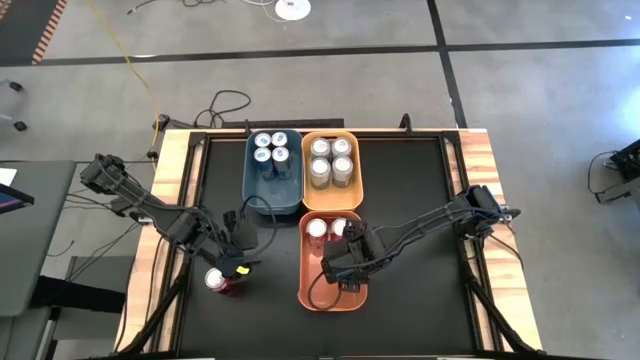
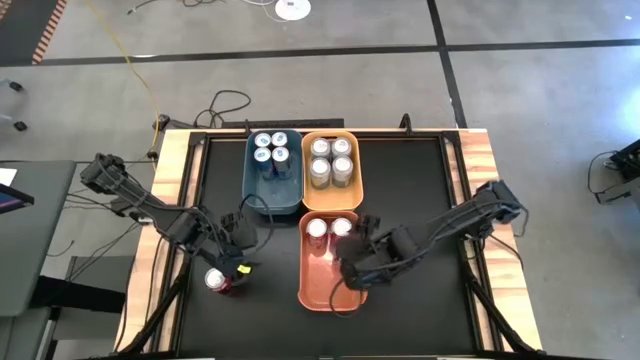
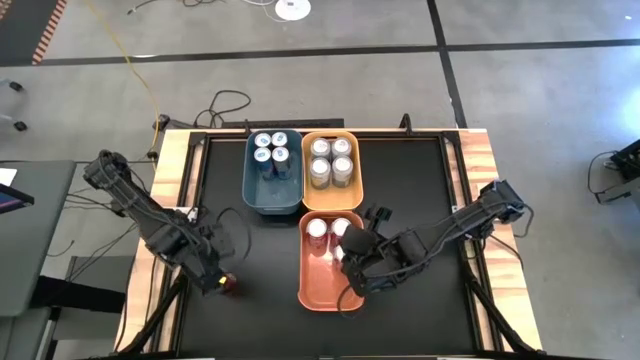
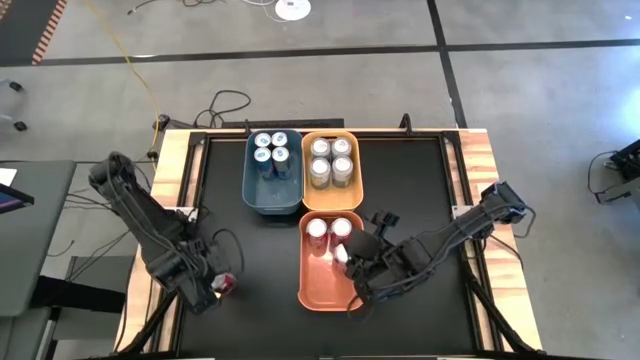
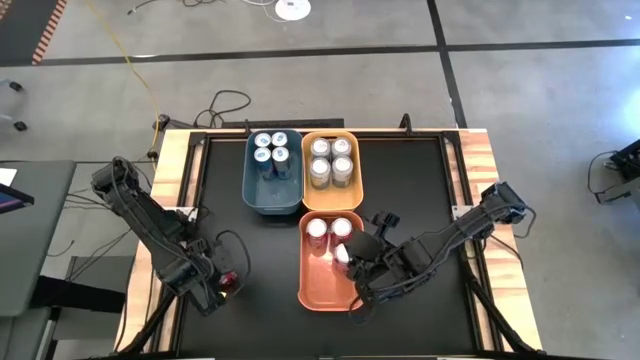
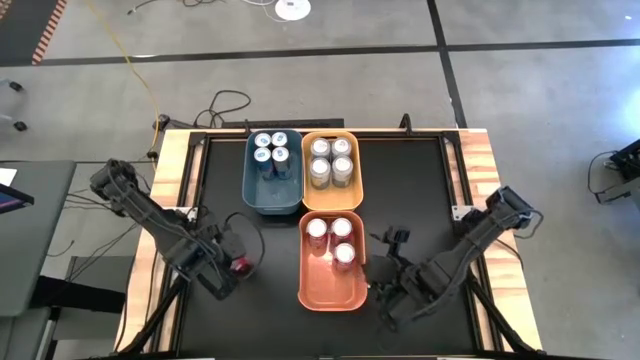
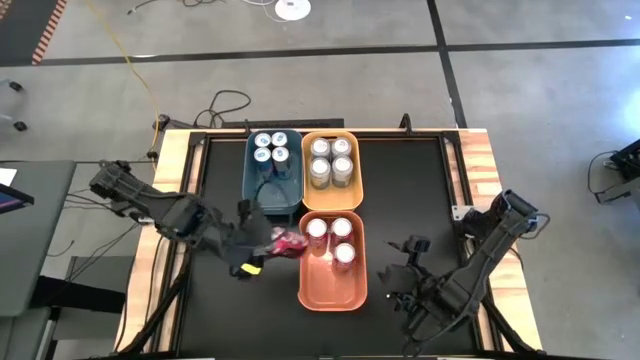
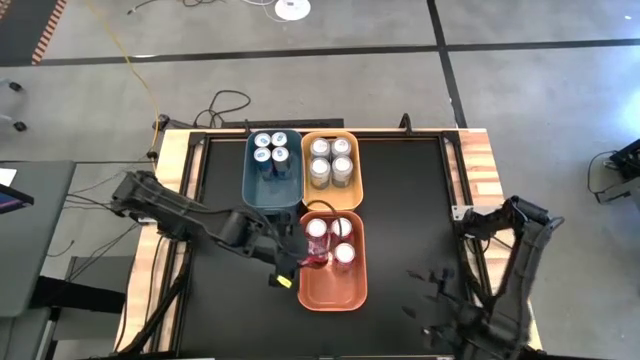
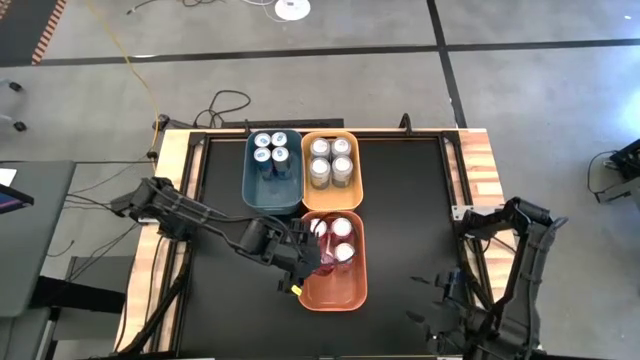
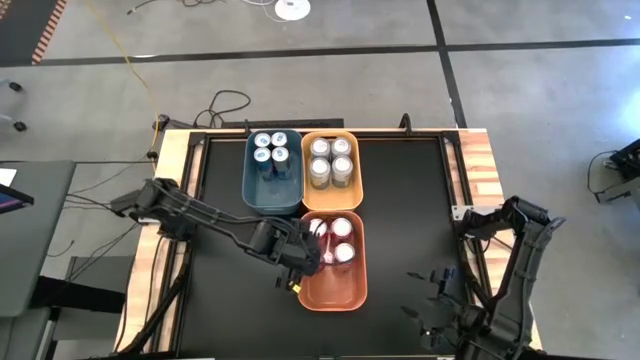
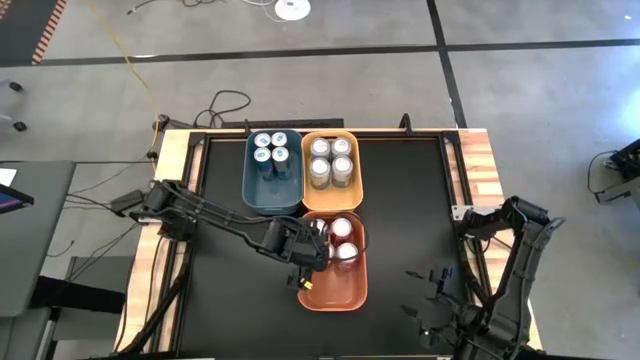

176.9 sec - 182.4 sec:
Task: Sort soda cans
Put the red soda can into the orange bin

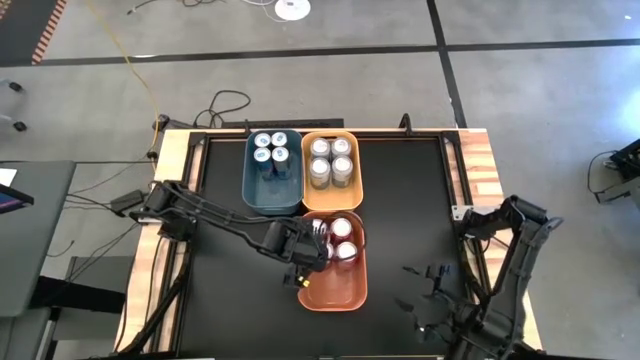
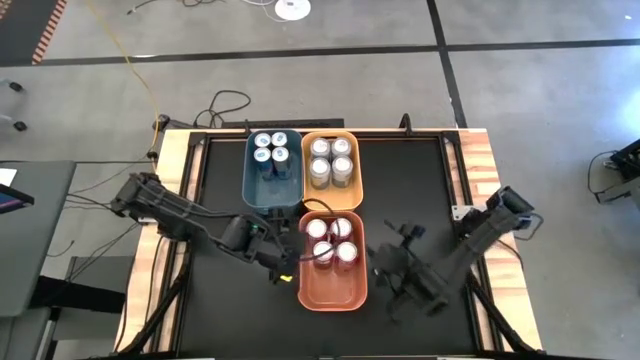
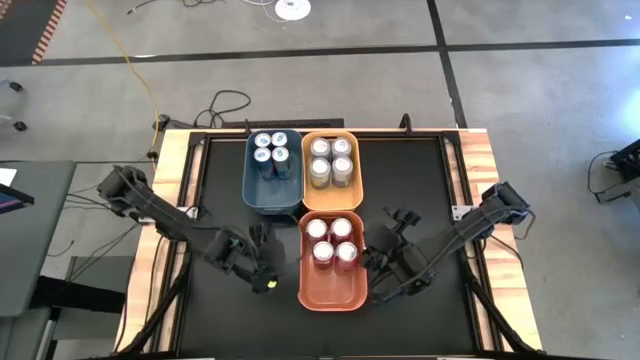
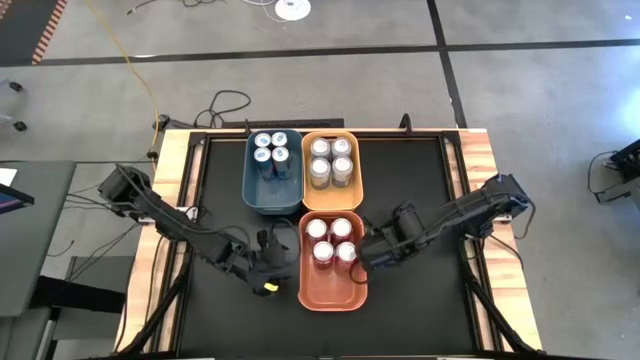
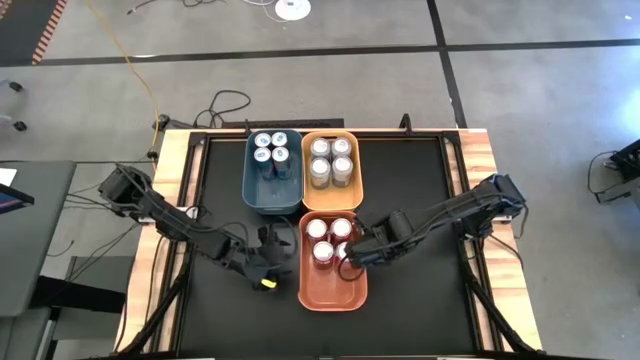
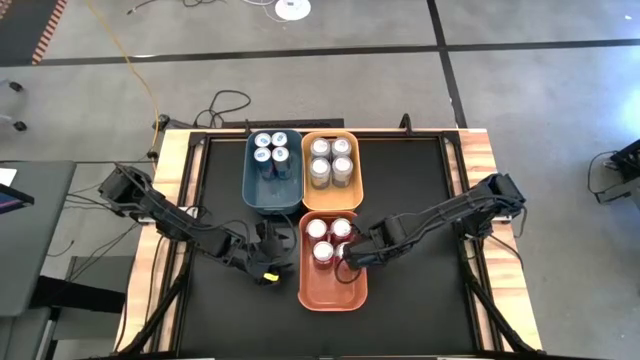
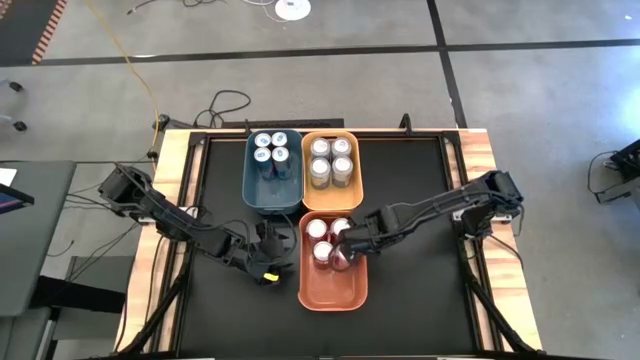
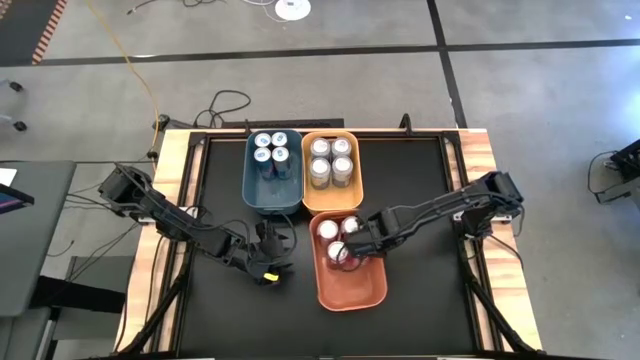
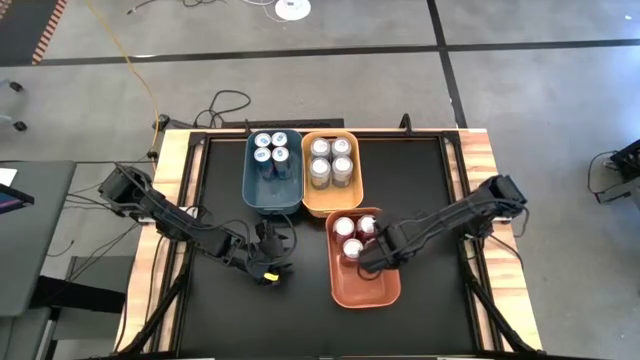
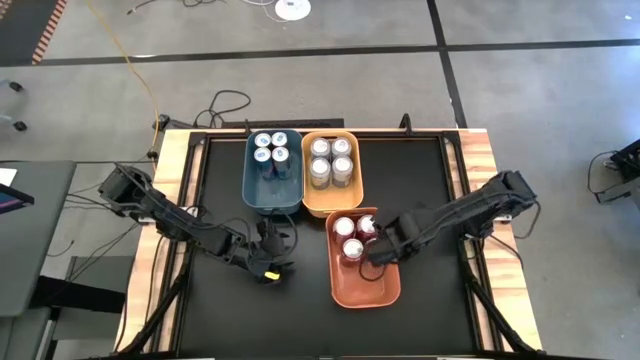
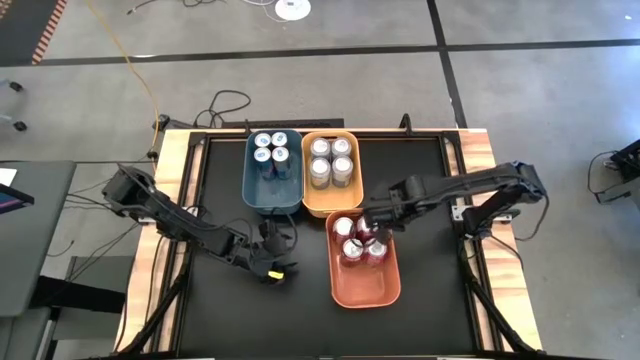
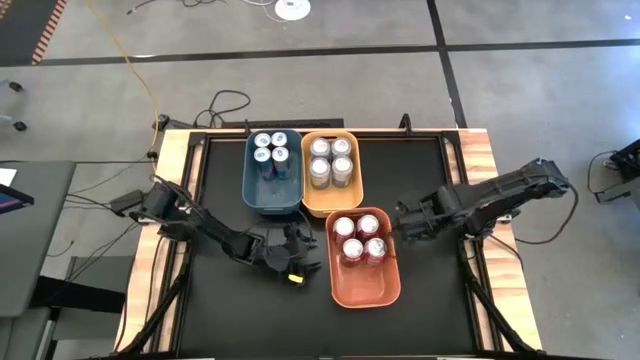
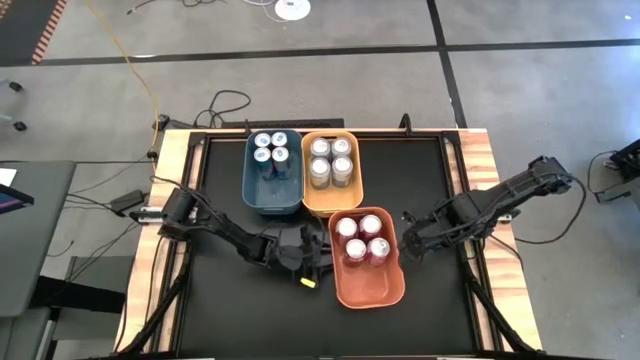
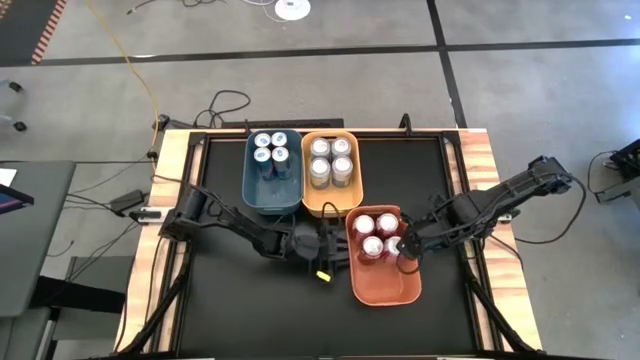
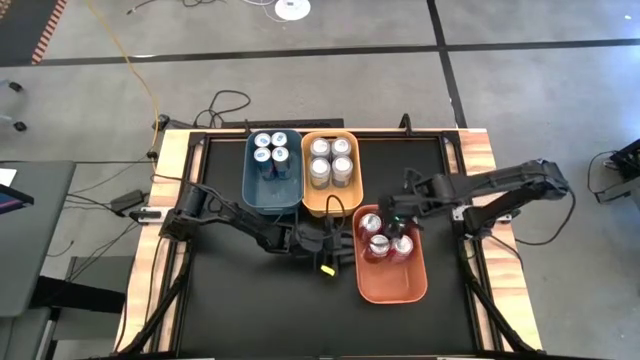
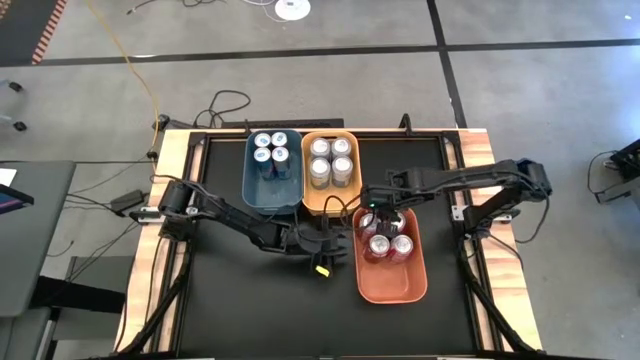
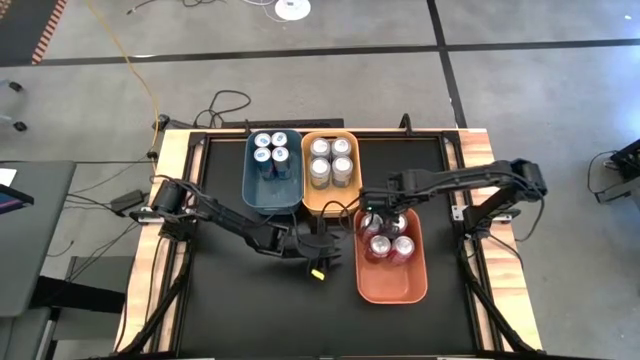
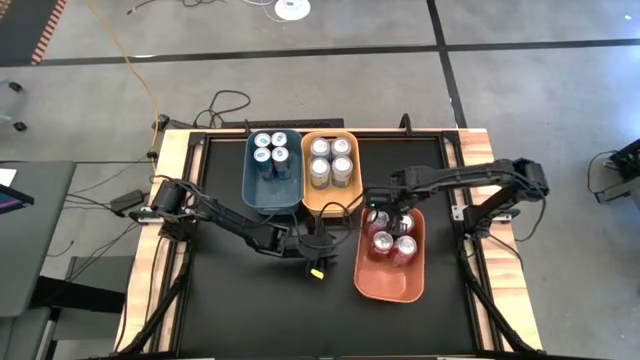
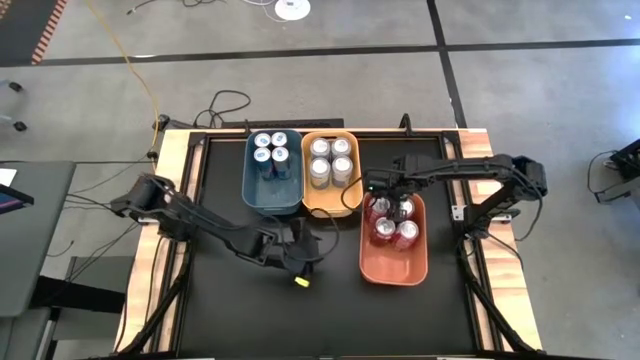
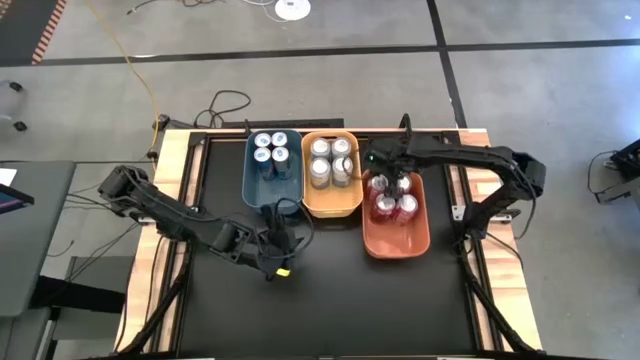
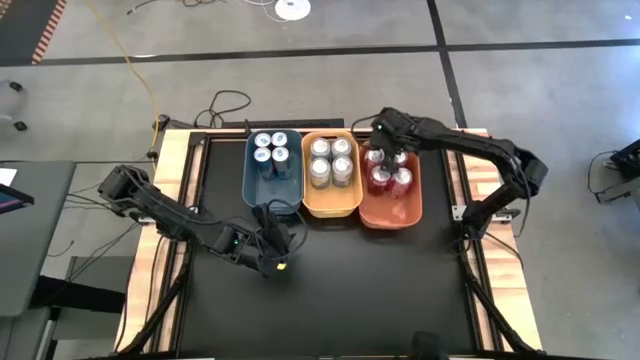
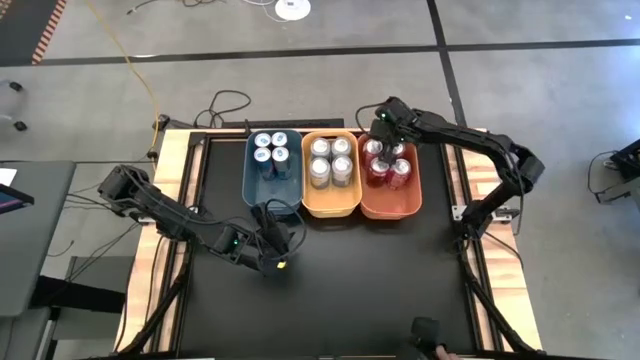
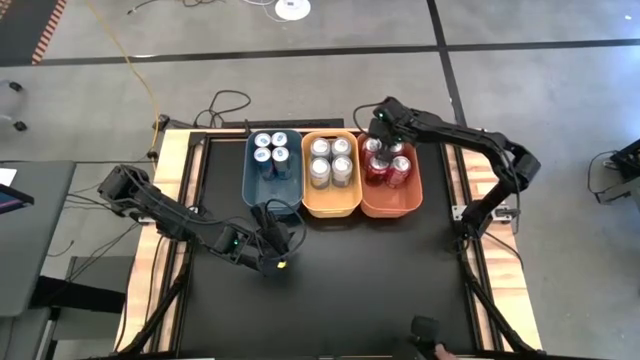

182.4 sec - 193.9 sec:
Move the orange bin to the right of the yellow bin

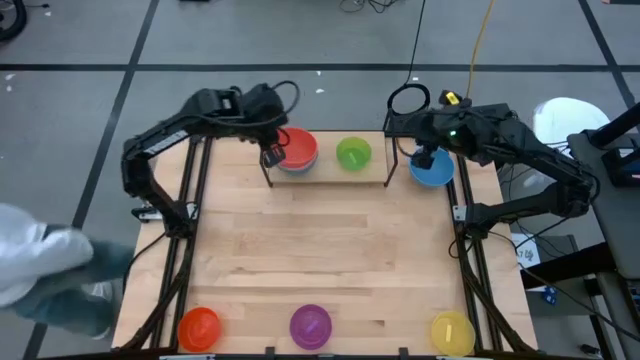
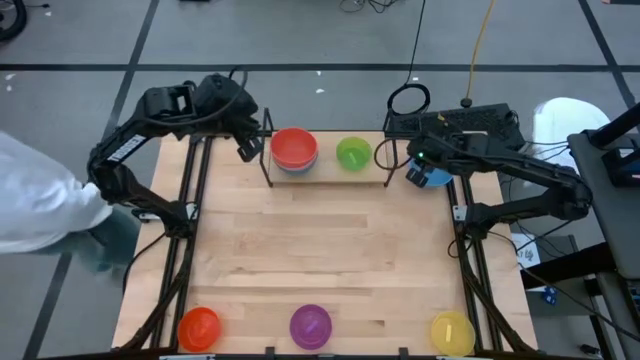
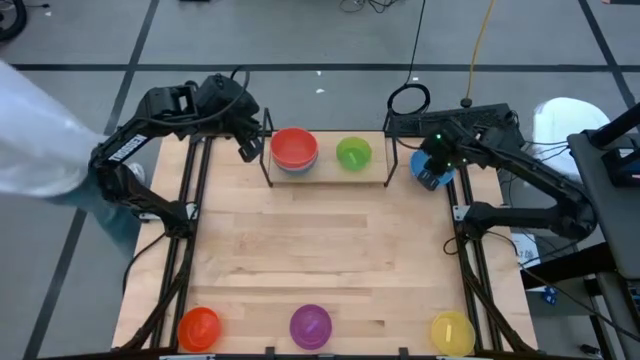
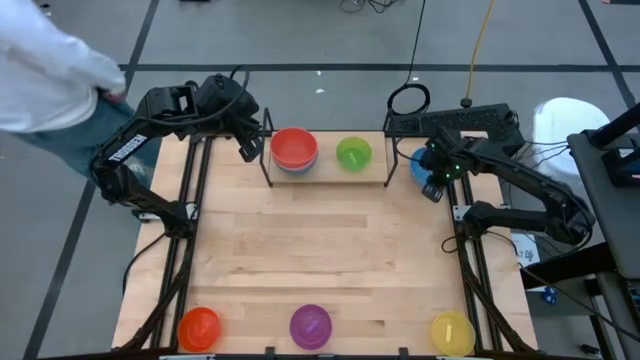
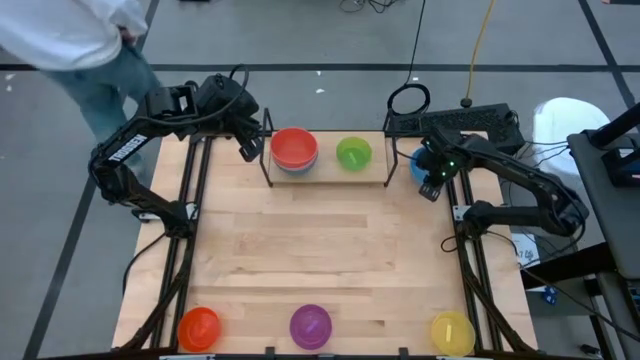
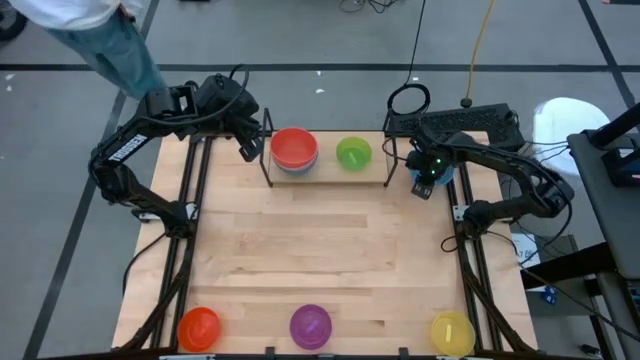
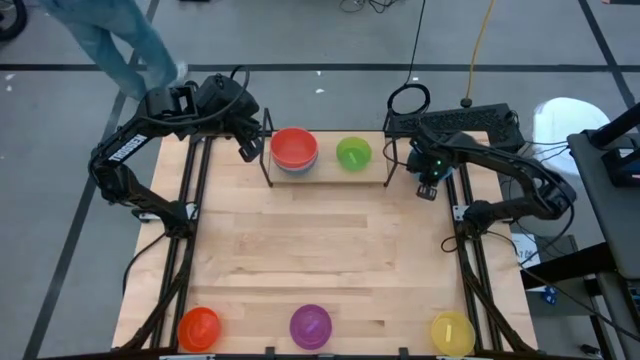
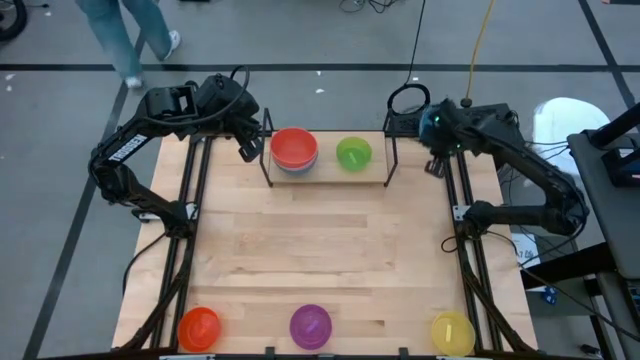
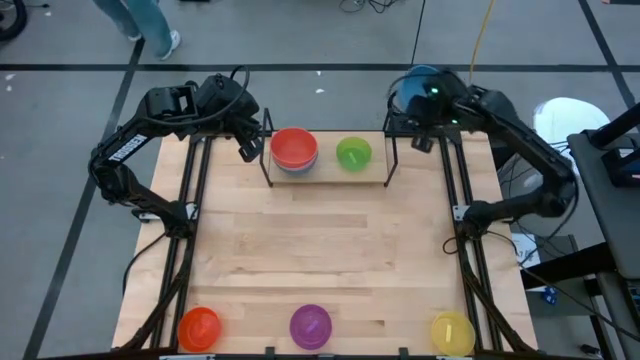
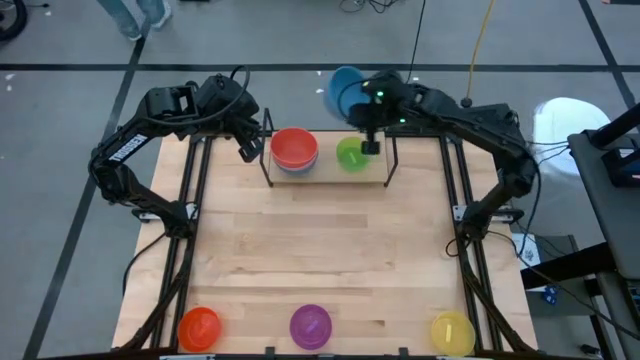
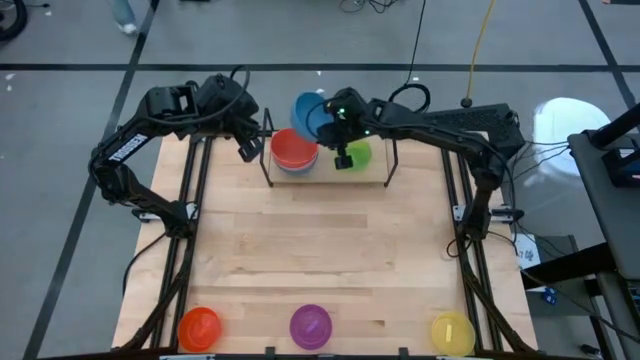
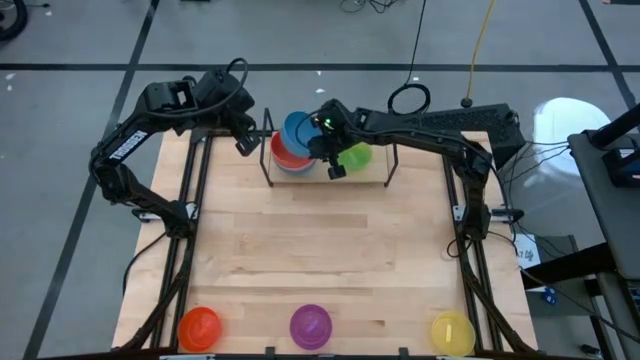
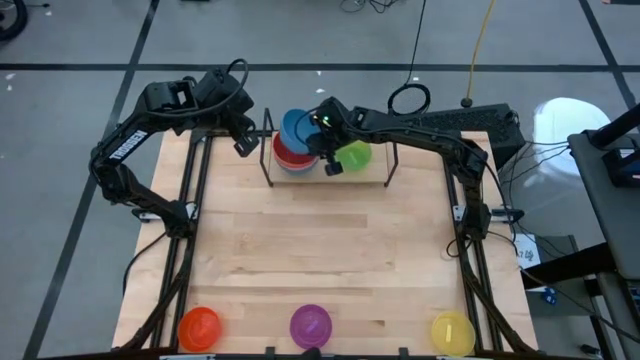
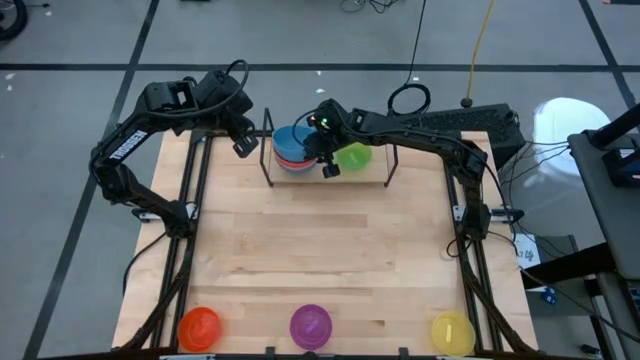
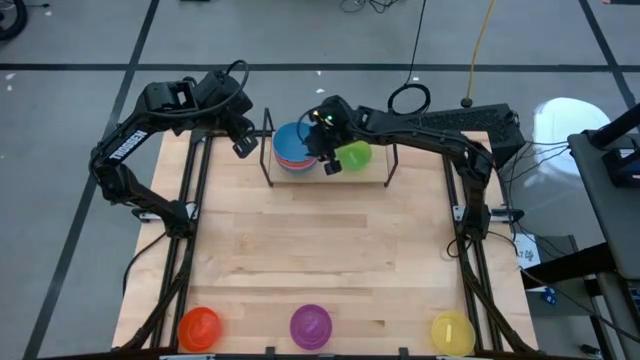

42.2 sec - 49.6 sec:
Task: Place and stack bowls onto a shelf
Stack the blue bowl on top of the orange bowl on the shelf
